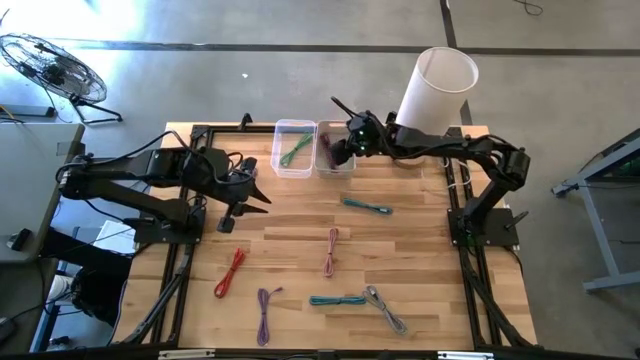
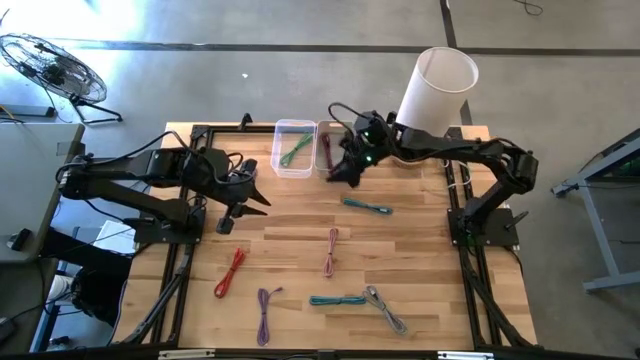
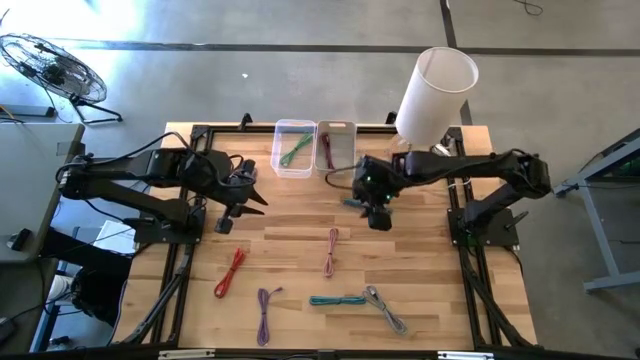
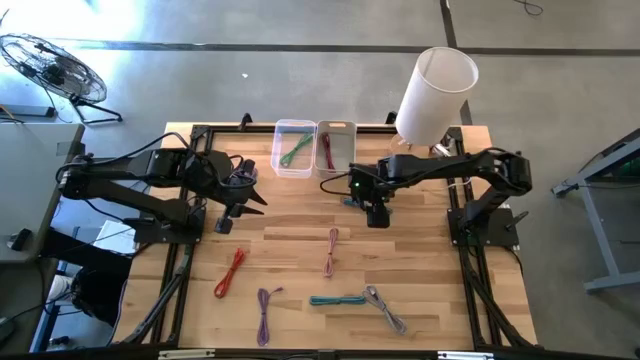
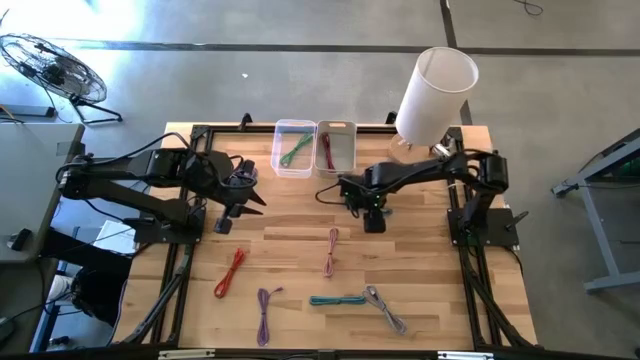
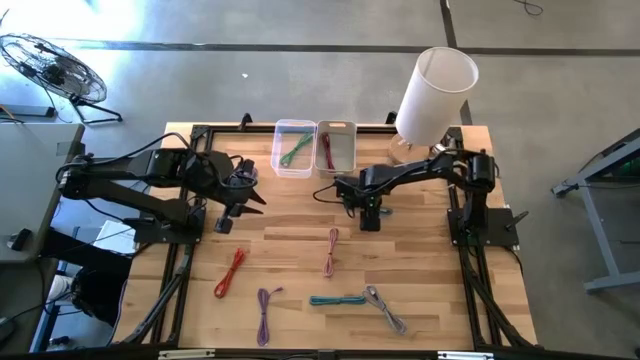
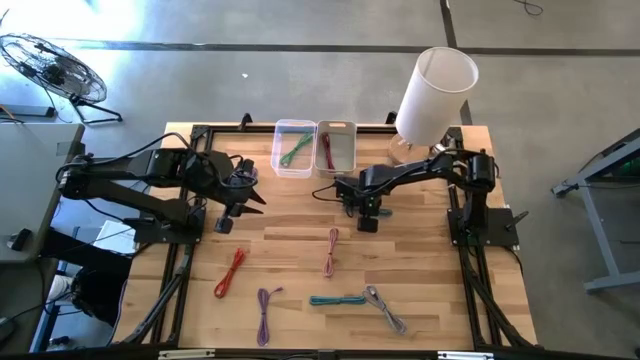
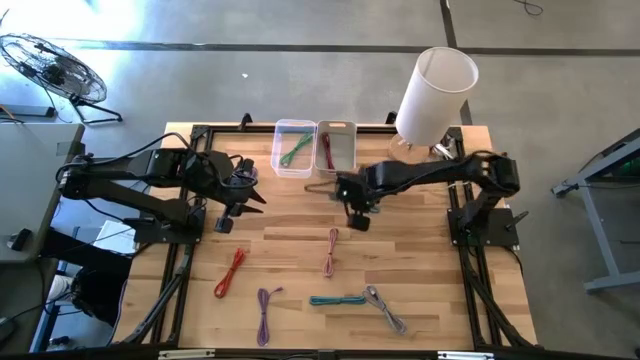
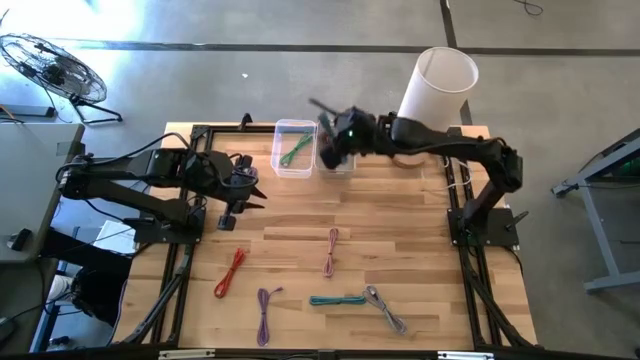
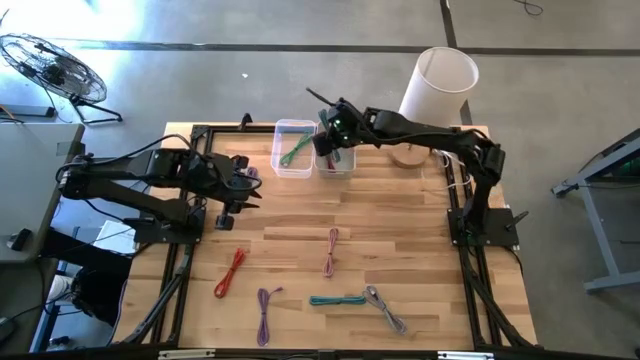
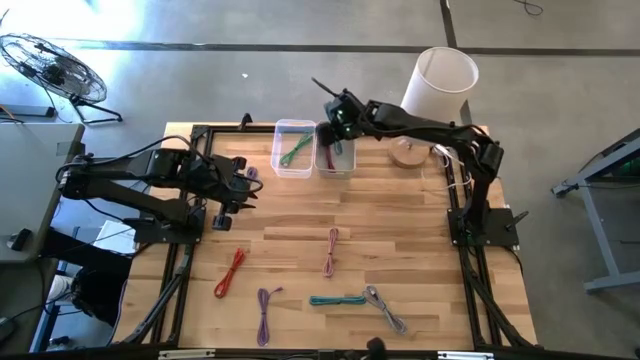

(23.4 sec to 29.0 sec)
Task: Pick & Place USB Port
Put the top blue and black charger cable into the gray bin

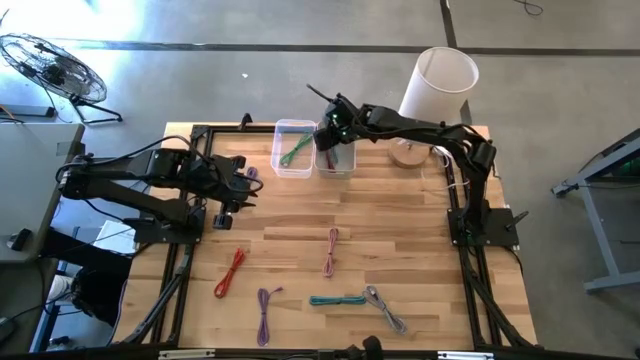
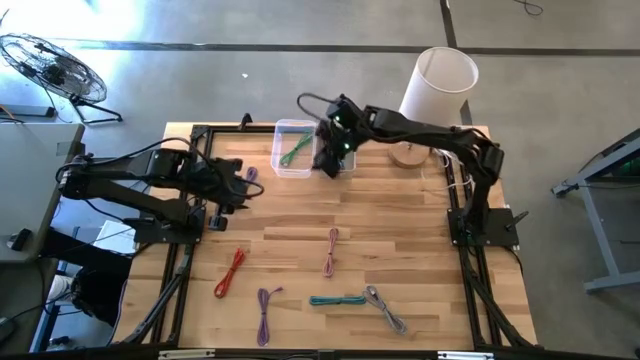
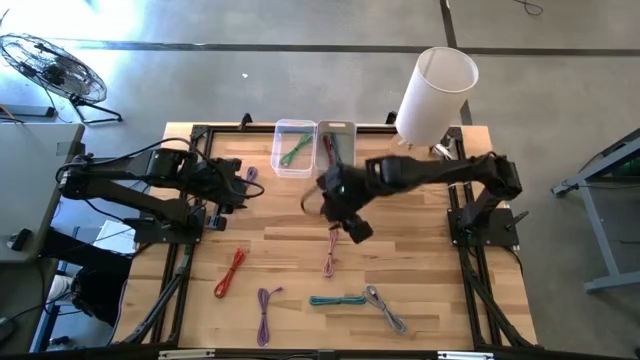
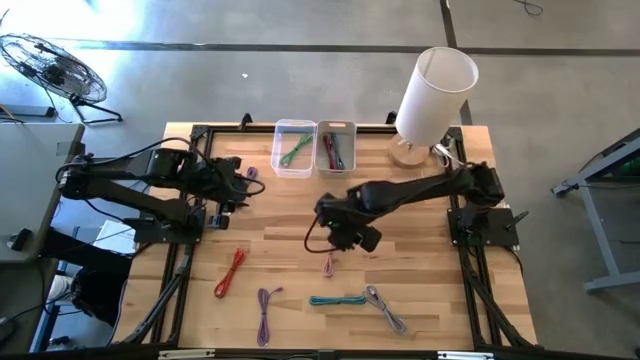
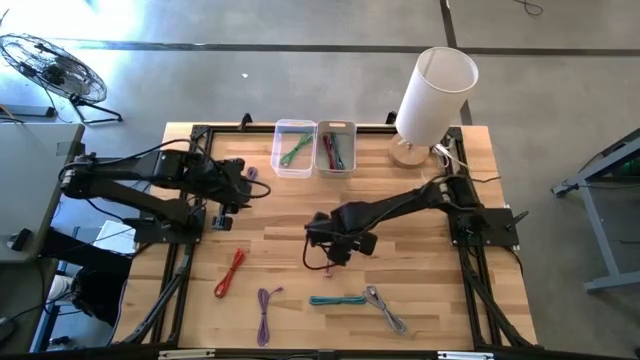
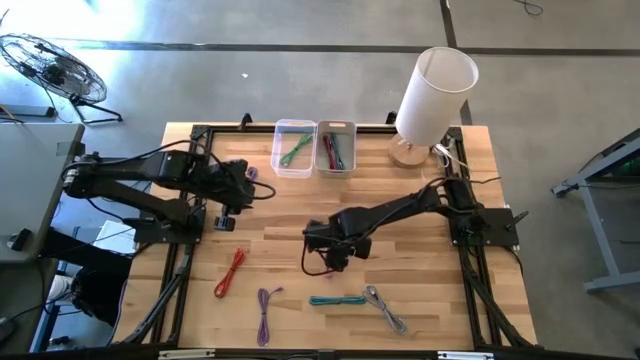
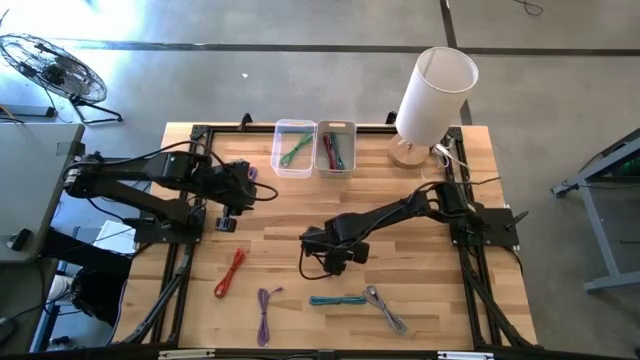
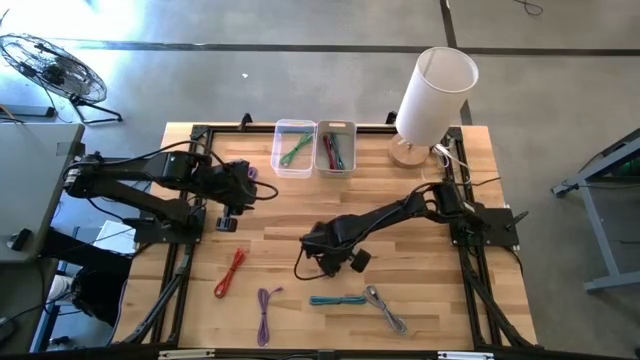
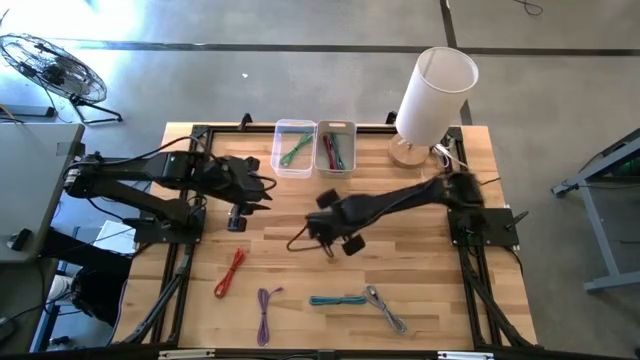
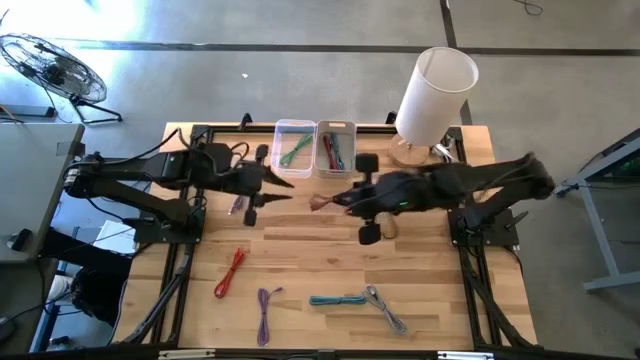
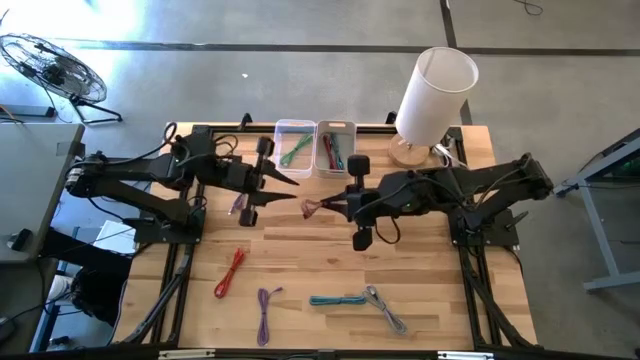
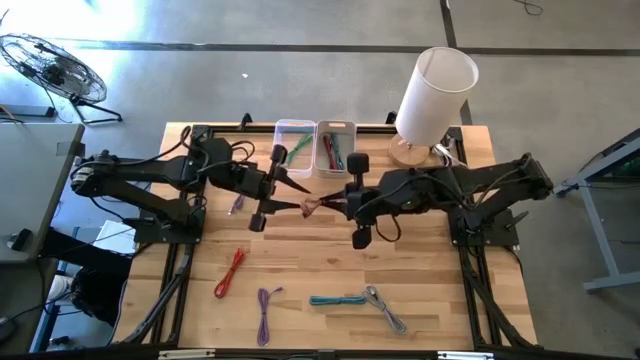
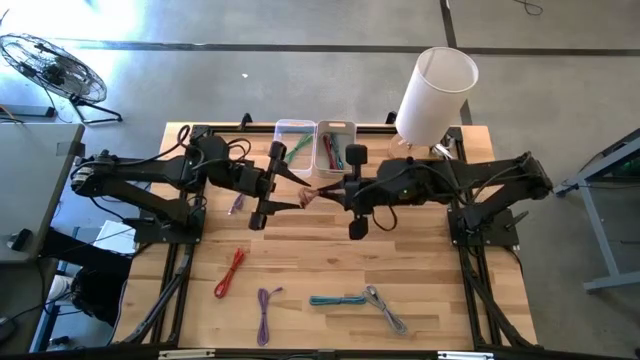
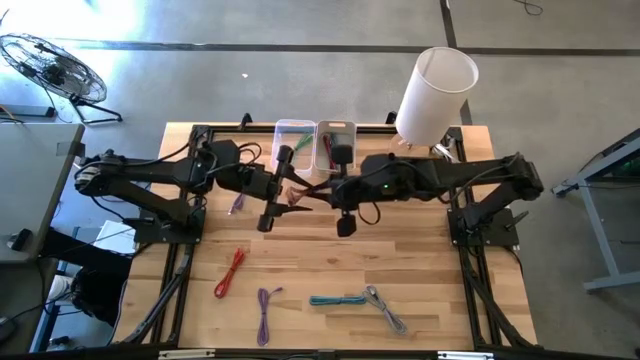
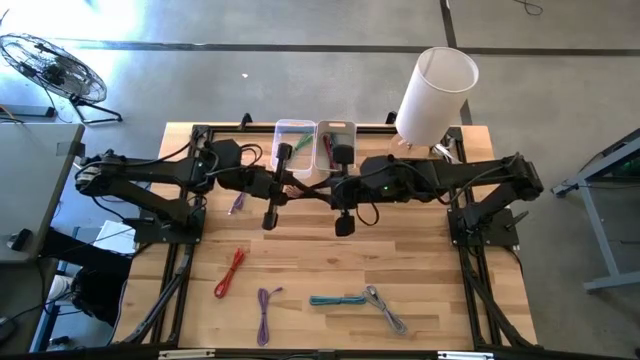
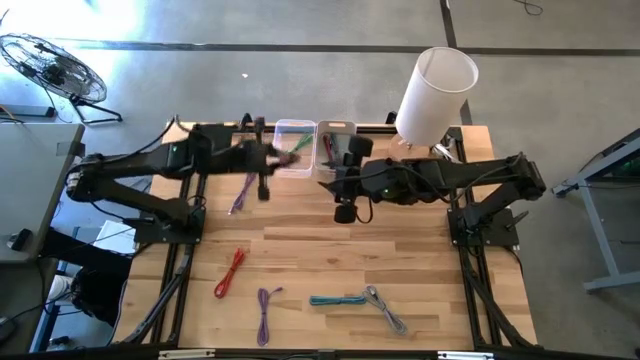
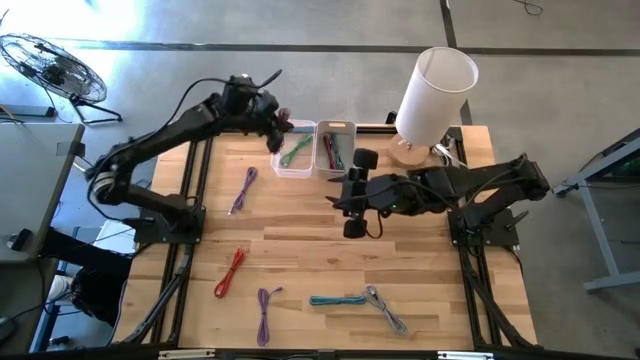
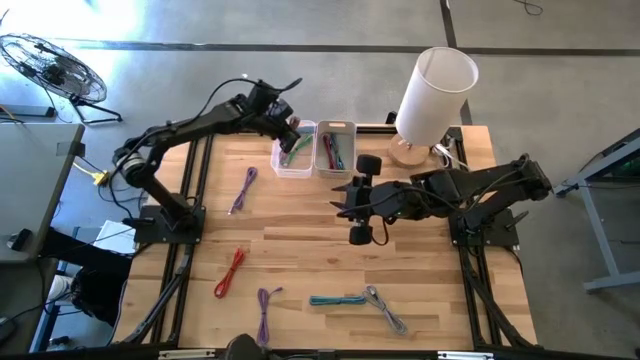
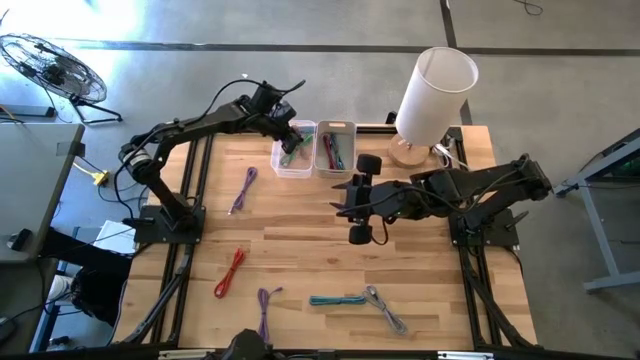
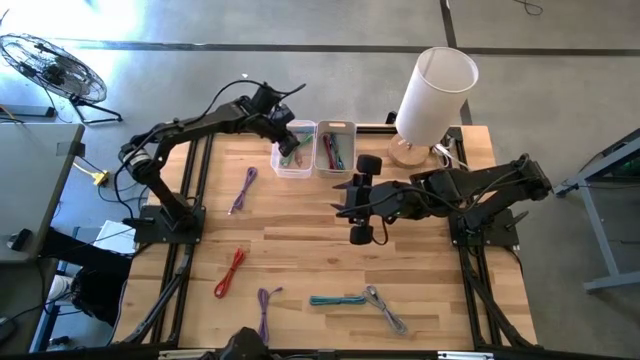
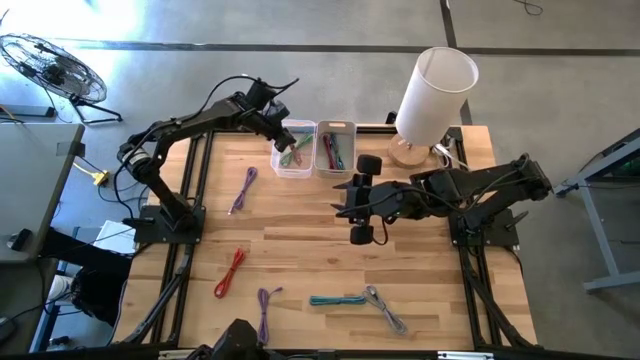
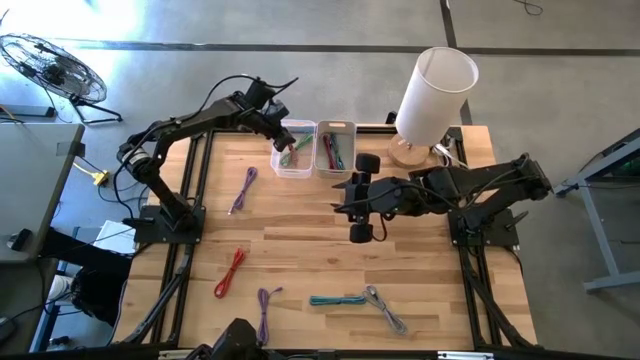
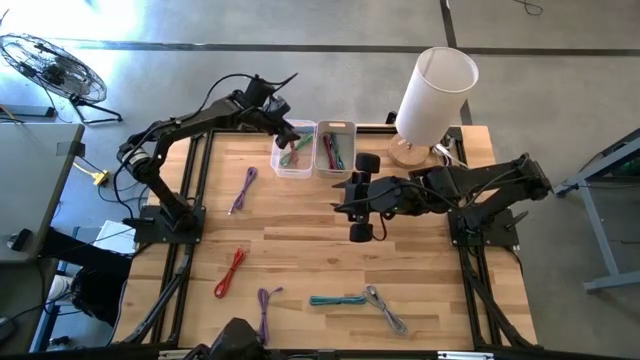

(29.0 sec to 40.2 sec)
Put the pink charger cable into the transparent bin

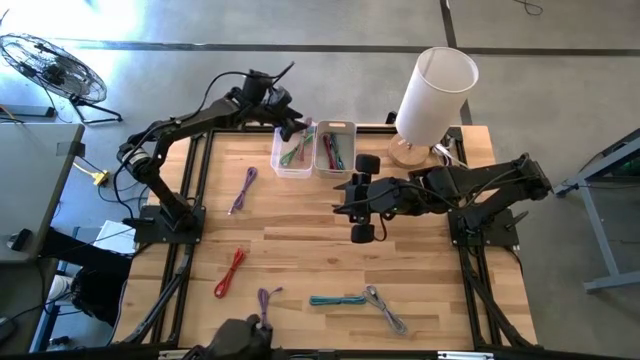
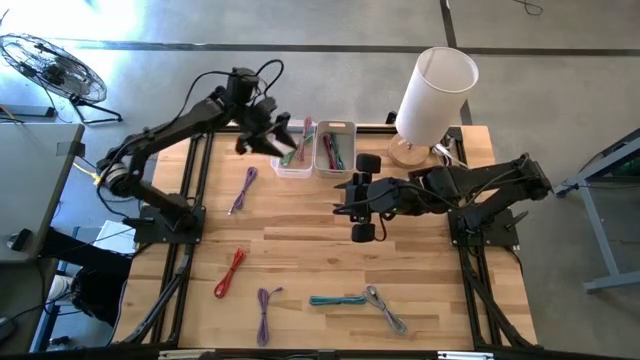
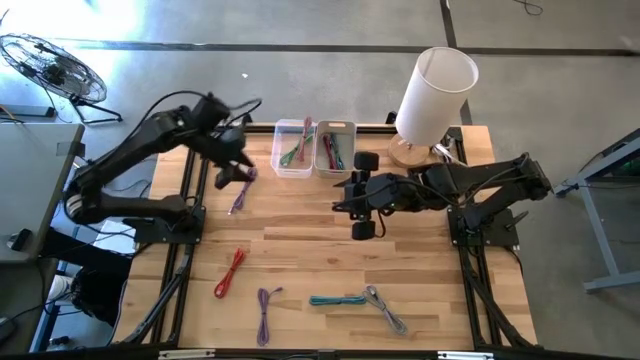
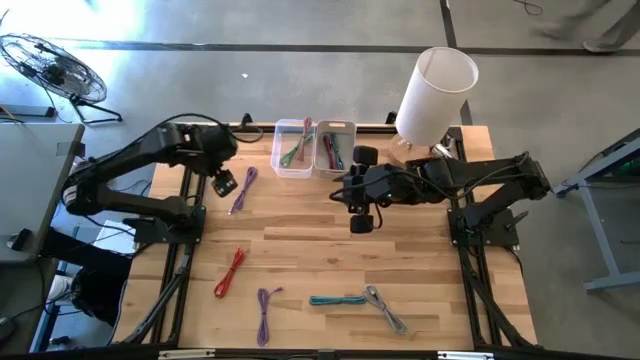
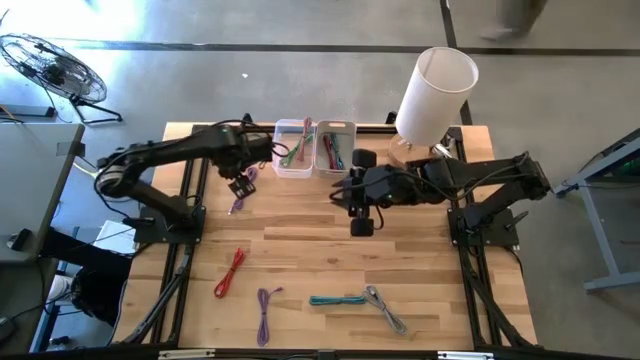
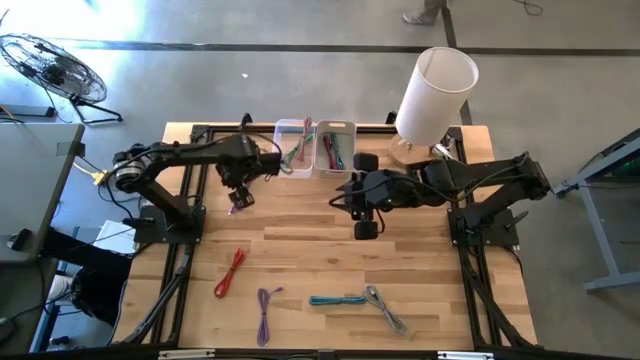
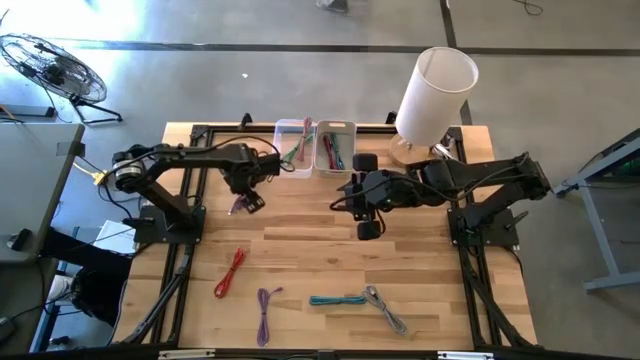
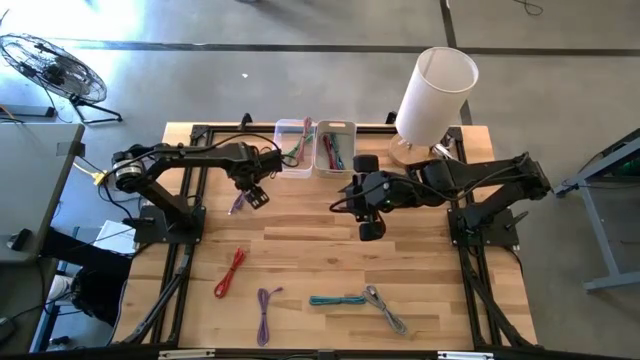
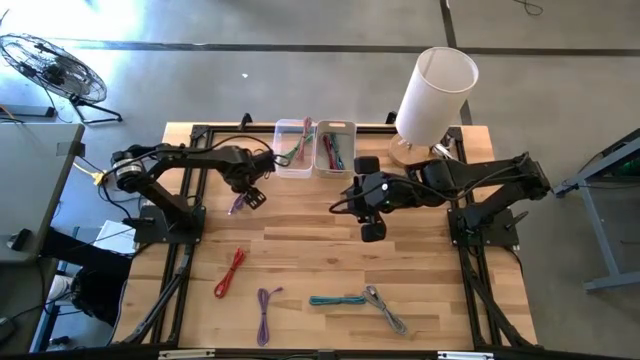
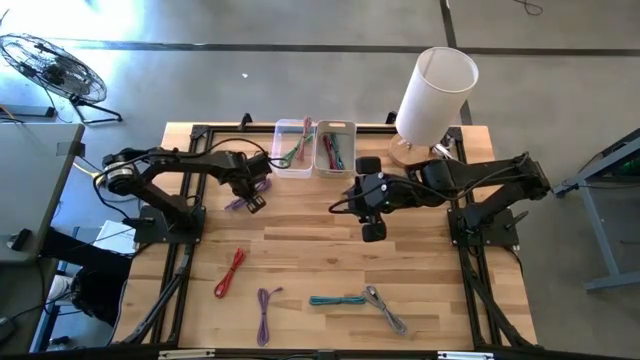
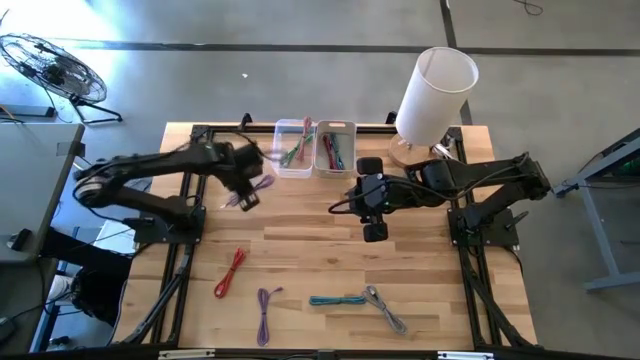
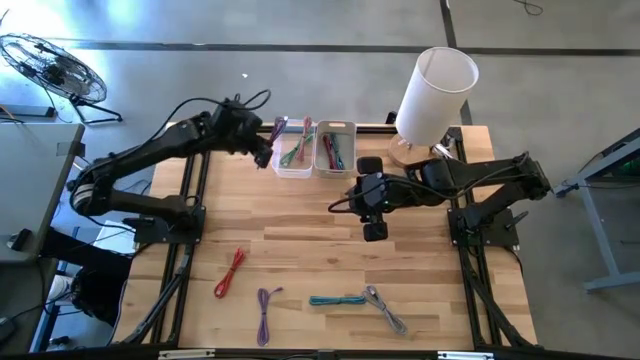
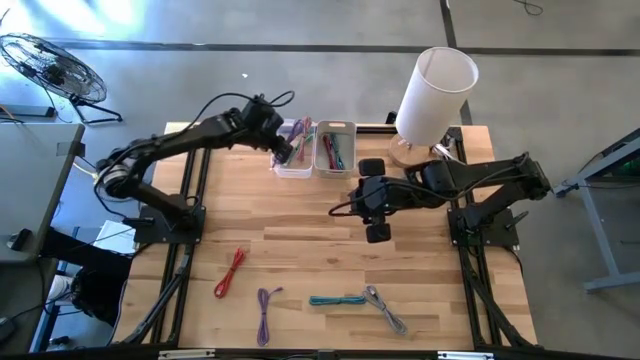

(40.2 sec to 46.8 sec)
Put the top purple charger cable into the transparent bin
